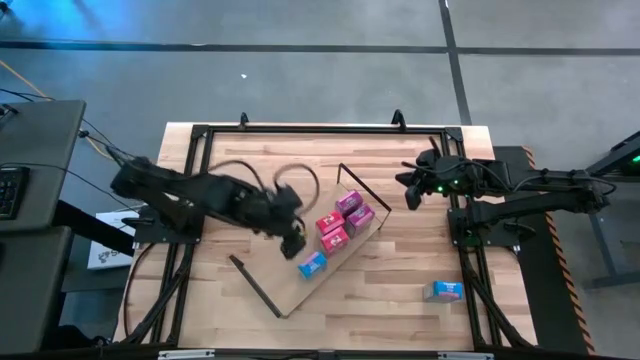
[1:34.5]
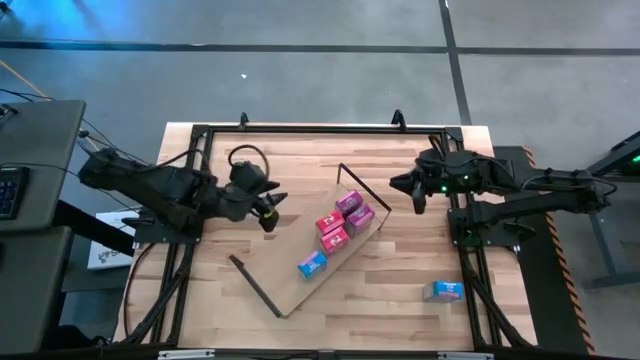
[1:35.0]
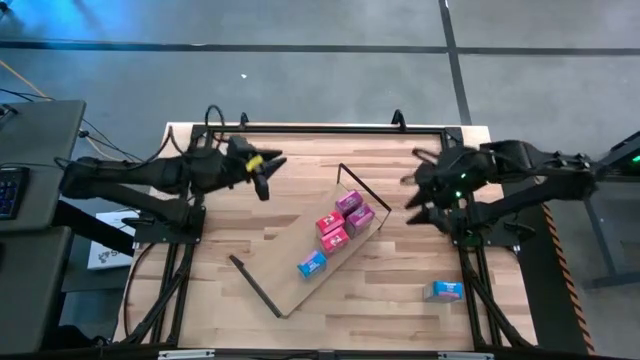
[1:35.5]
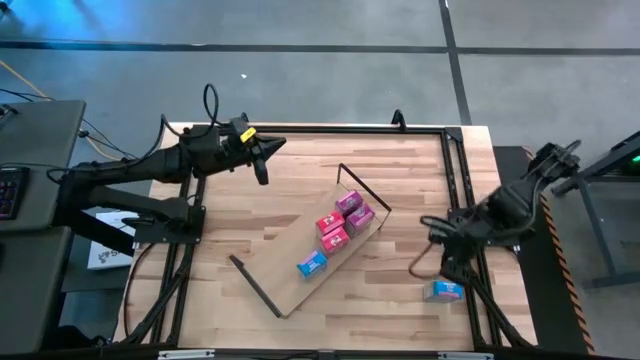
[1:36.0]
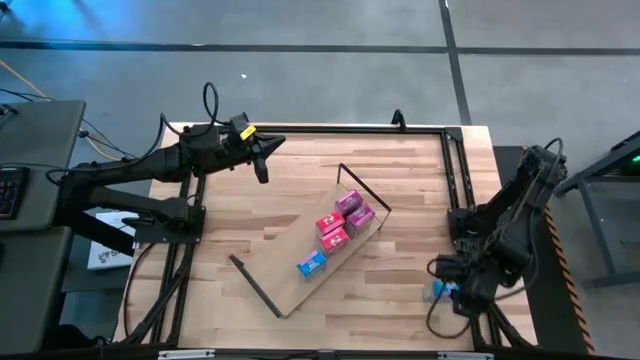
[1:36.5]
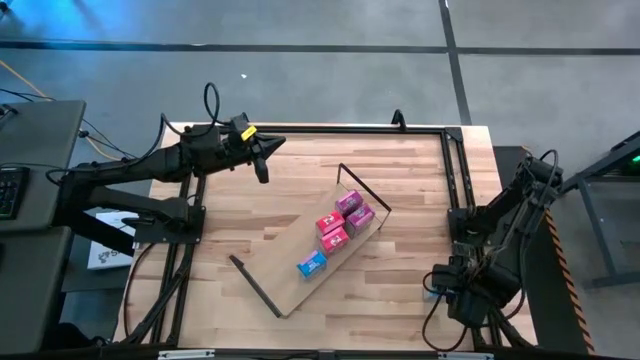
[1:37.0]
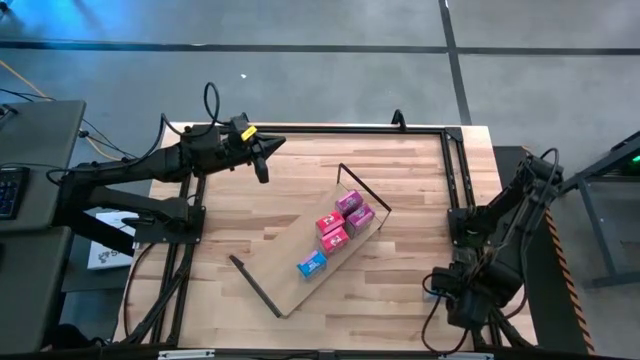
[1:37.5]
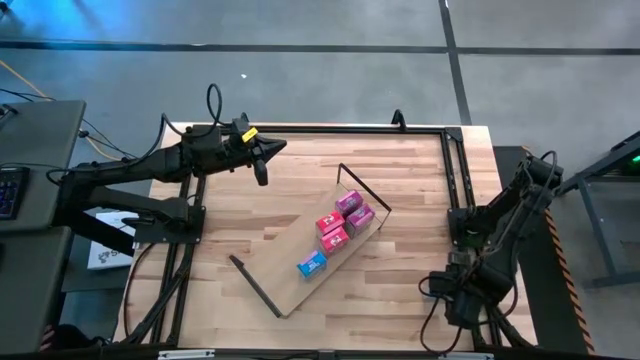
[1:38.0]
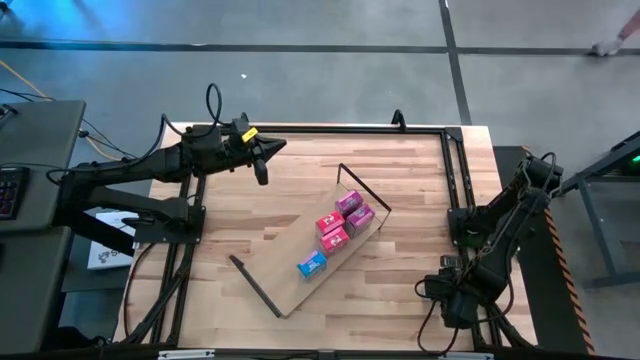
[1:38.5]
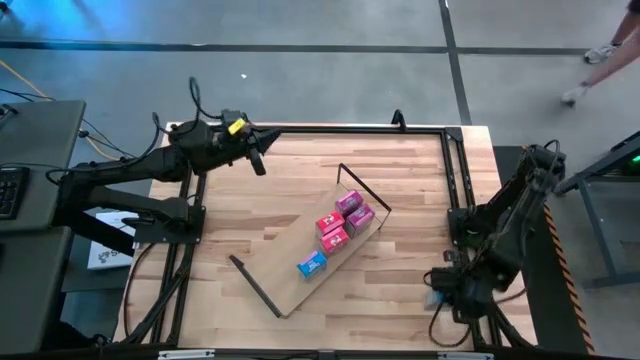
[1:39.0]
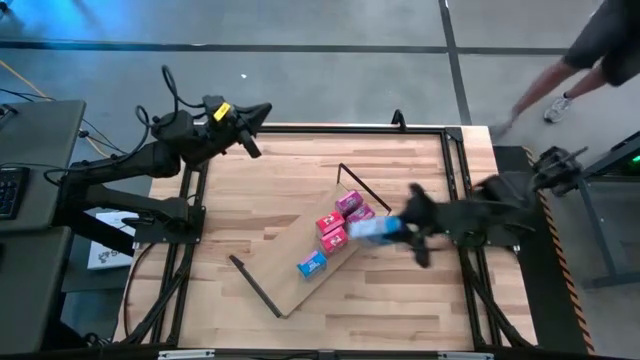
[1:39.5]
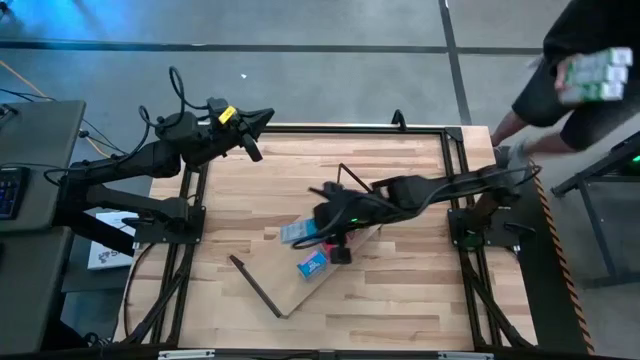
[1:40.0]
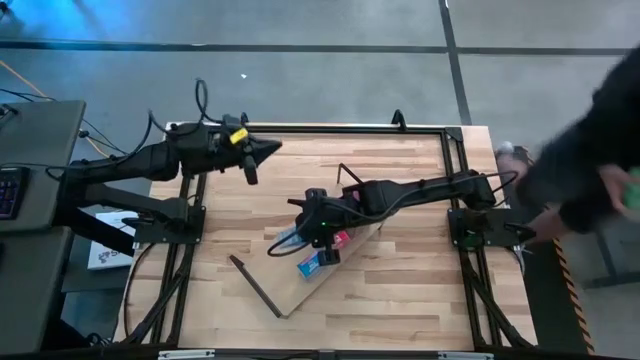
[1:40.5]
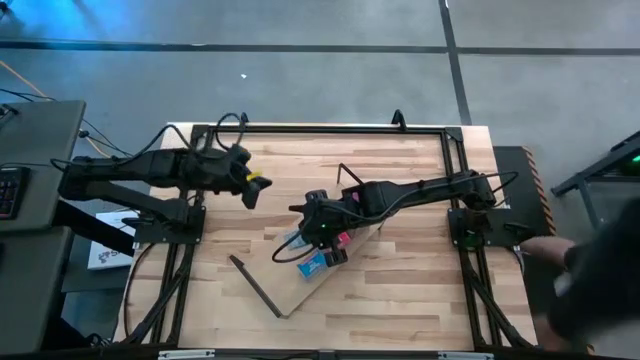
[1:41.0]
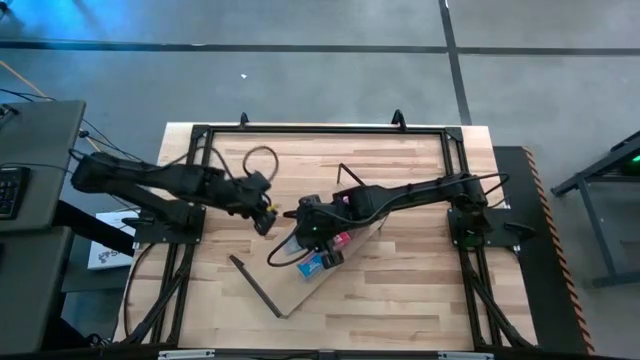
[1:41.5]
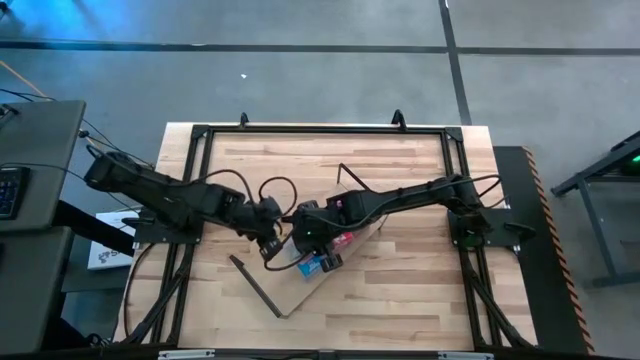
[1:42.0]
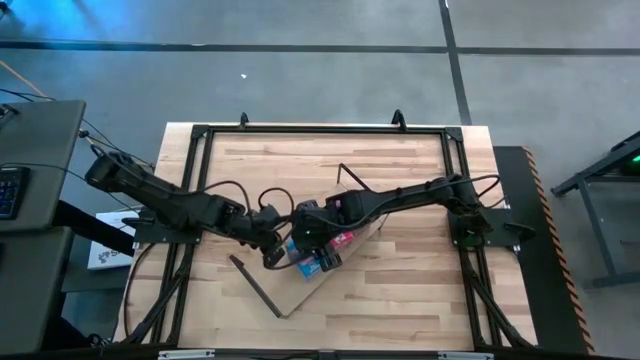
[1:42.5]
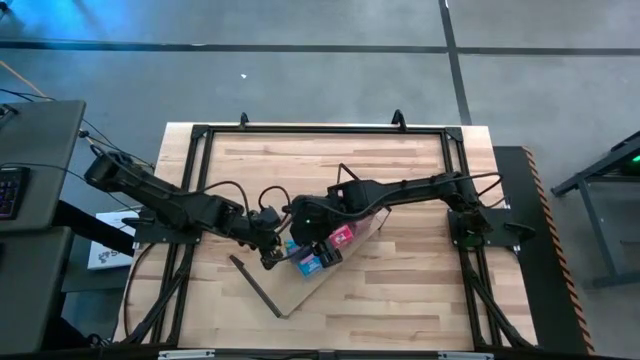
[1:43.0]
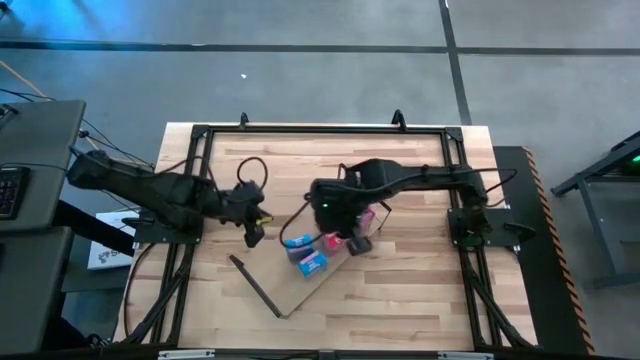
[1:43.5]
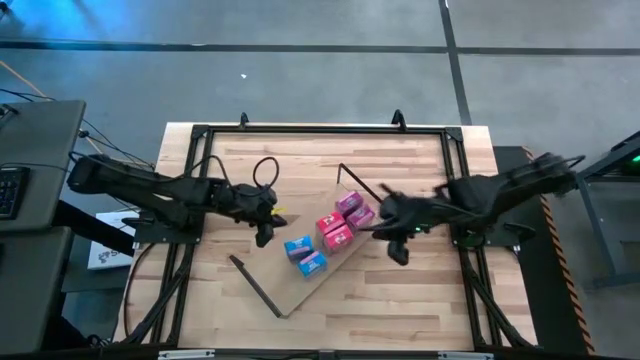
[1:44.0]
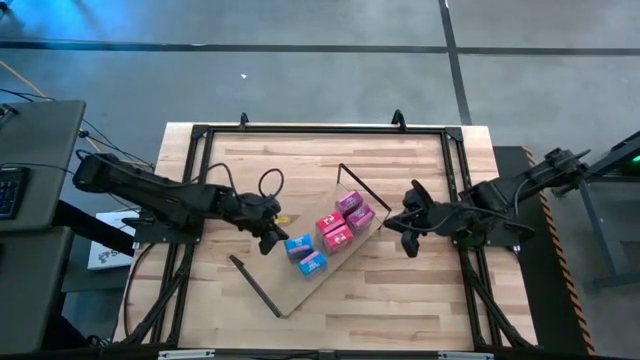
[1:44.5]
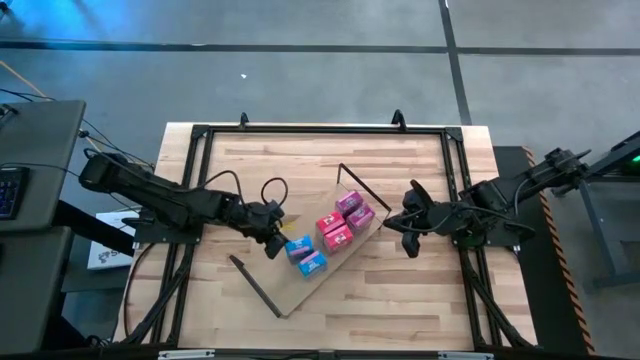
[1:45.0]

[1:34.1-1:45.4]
Task: Stack cereal on shelf
Put the blue cereal box on the shelf aligned with the other blue cereal box

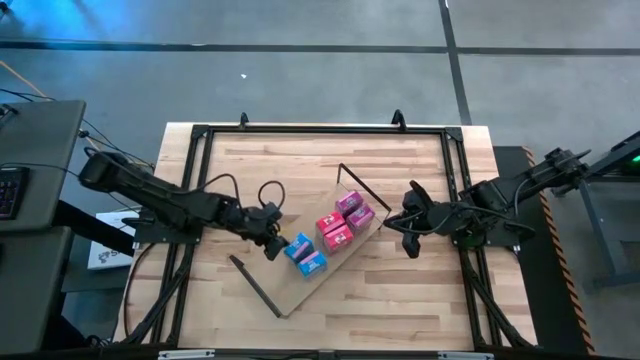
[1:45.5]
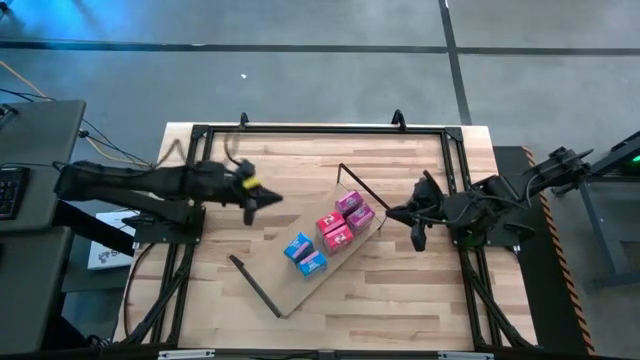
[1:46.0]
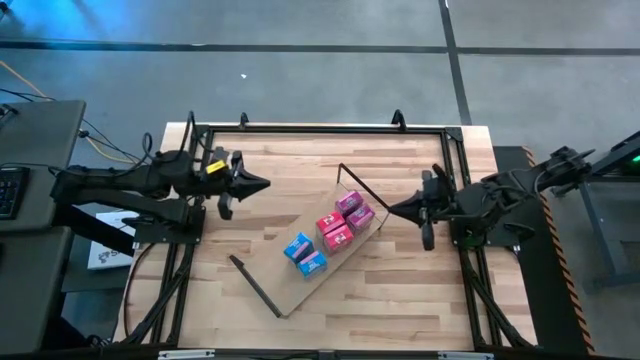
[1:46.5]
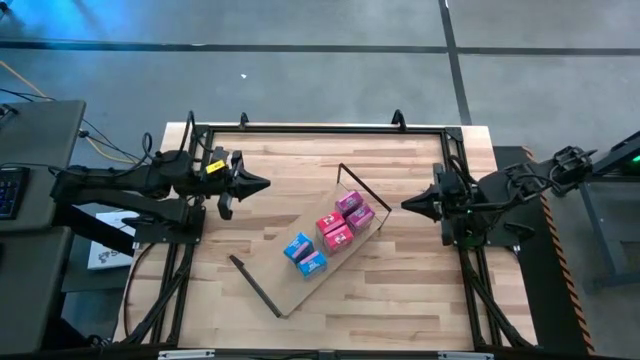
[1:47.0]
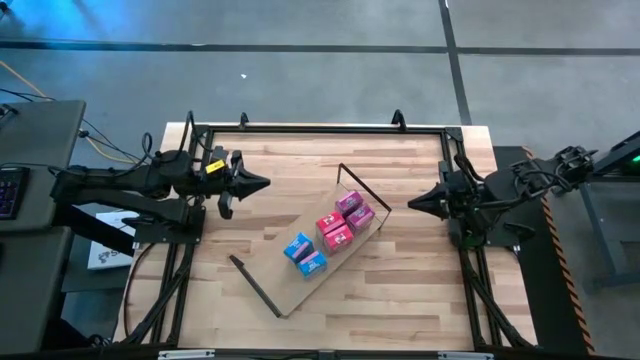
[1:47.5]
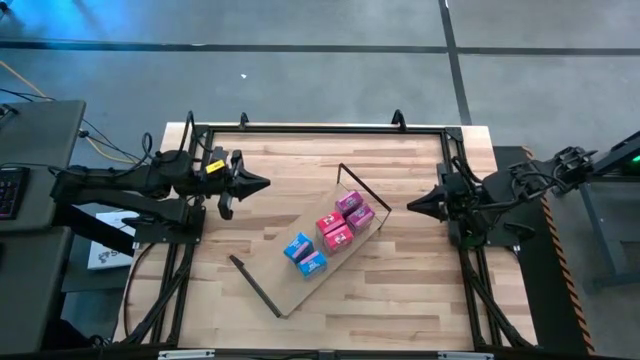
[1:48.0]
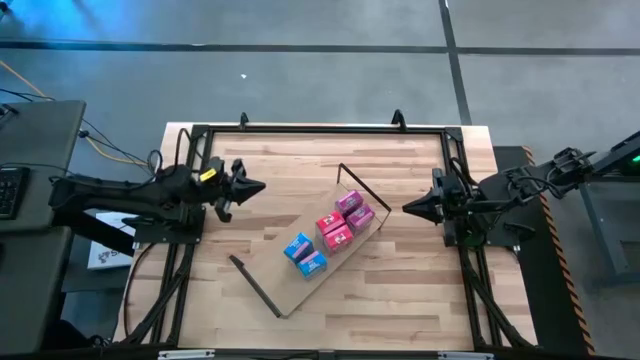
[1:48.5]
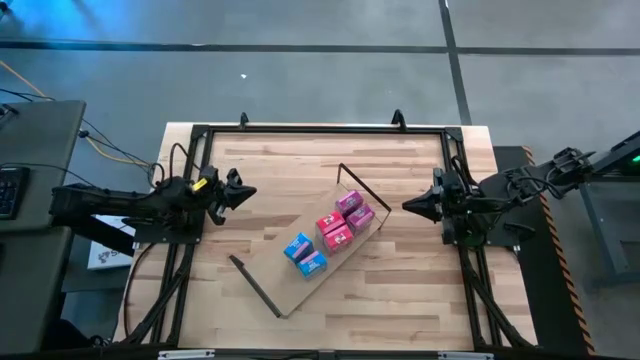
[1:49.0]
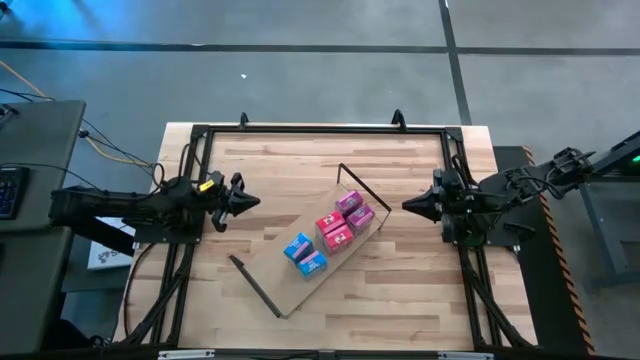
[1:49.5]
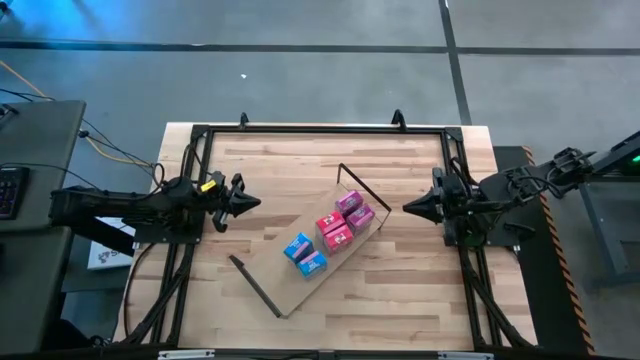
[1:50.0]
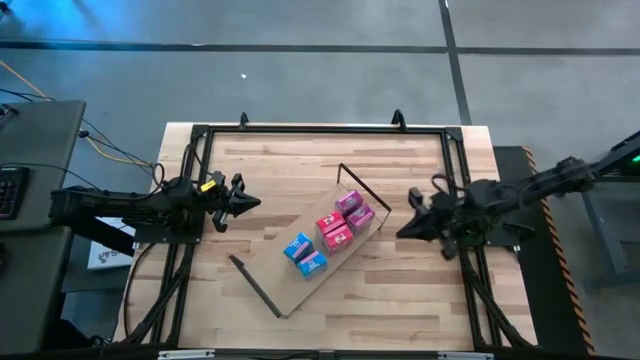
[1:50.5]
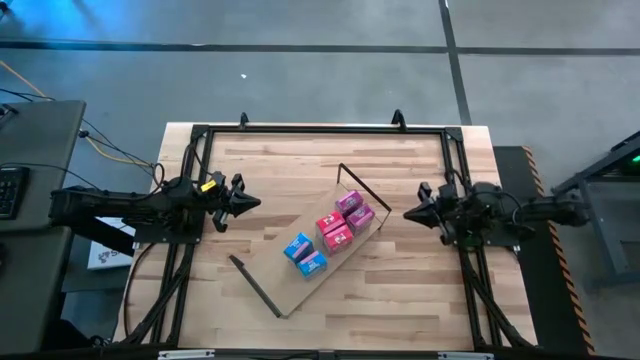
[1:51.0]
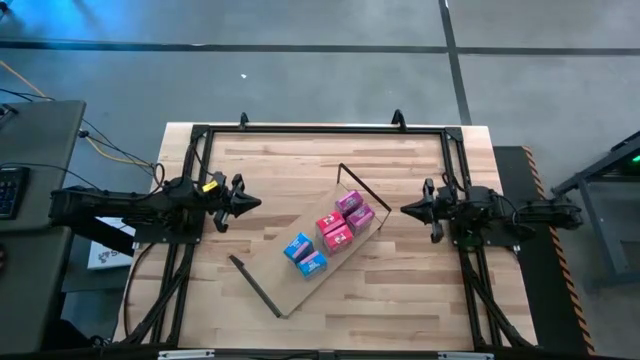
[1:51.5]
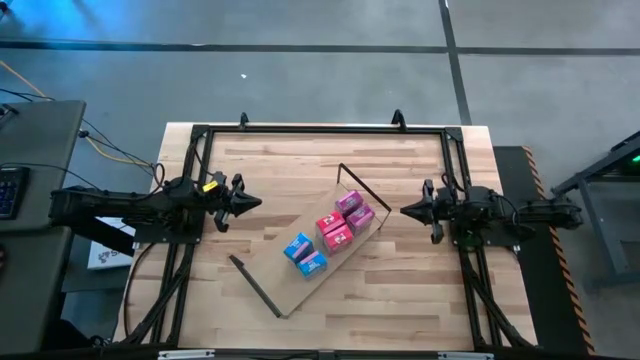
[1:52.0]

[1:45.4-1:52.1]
Return to Home Position

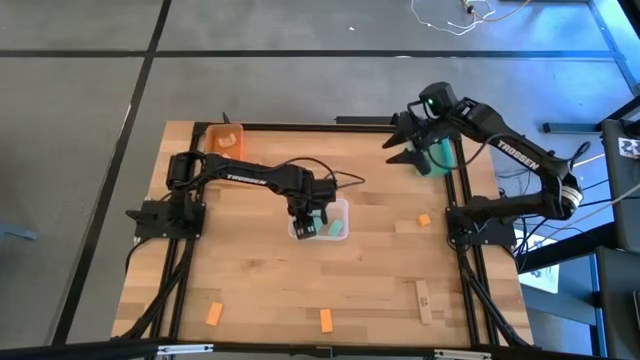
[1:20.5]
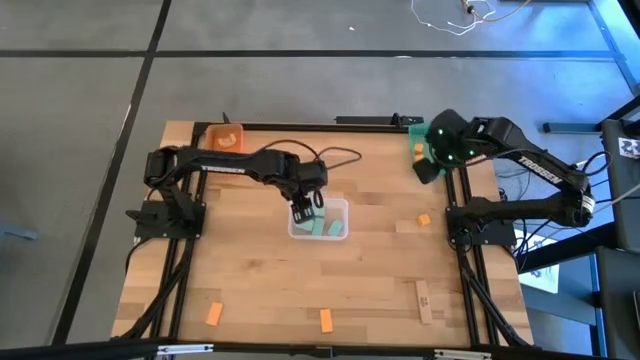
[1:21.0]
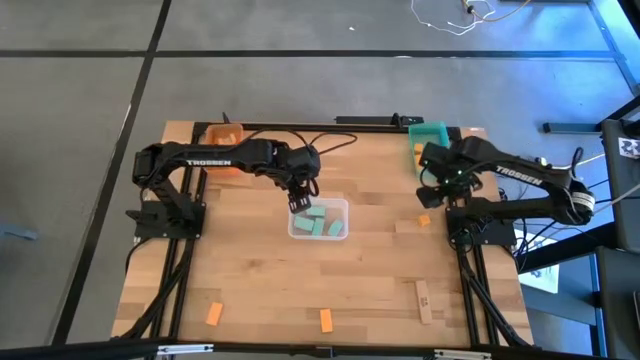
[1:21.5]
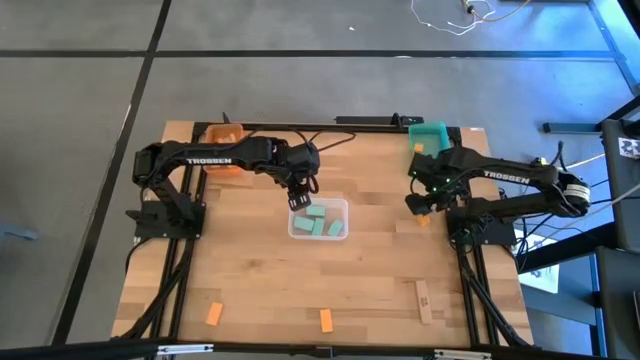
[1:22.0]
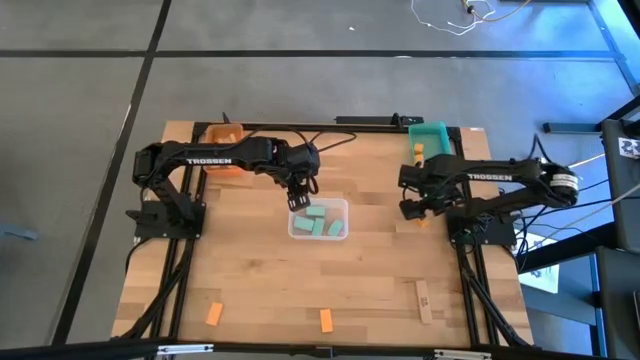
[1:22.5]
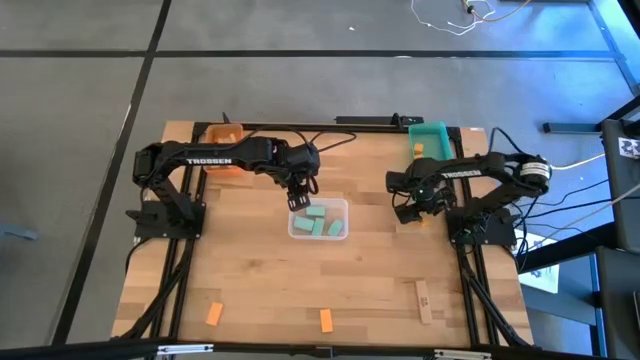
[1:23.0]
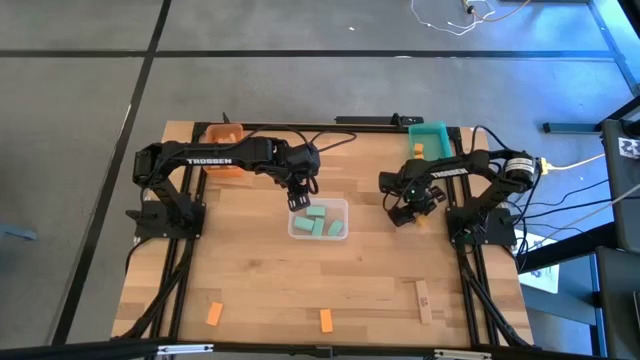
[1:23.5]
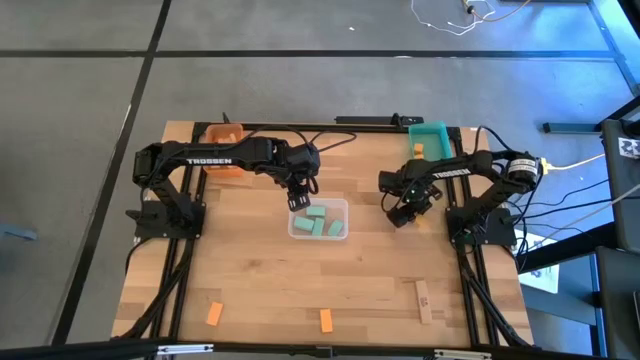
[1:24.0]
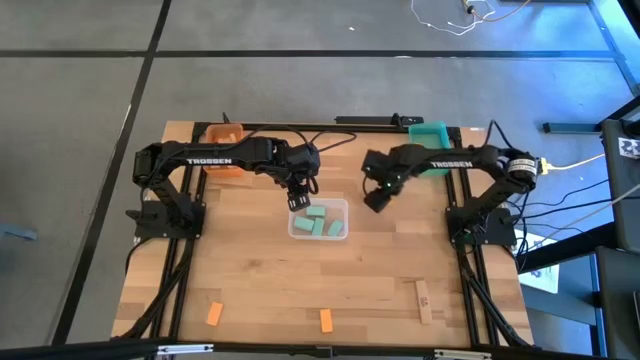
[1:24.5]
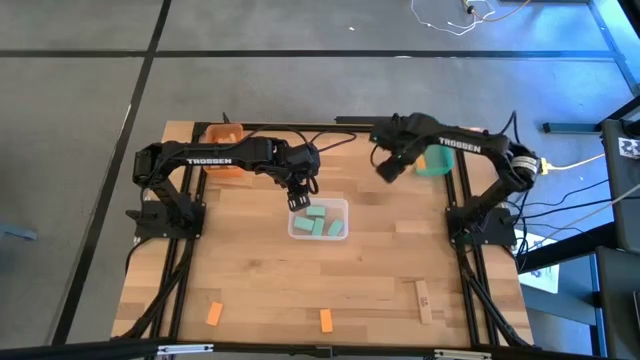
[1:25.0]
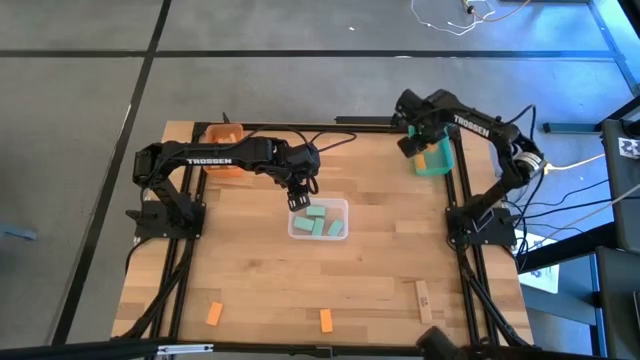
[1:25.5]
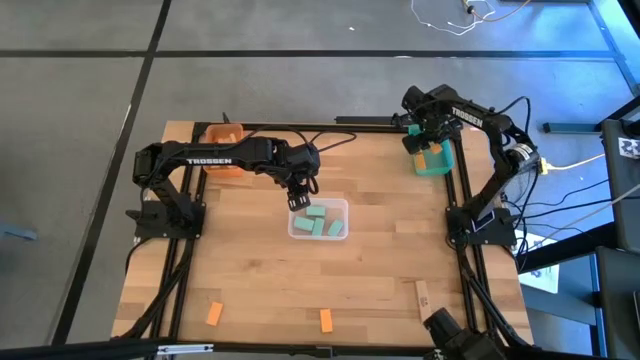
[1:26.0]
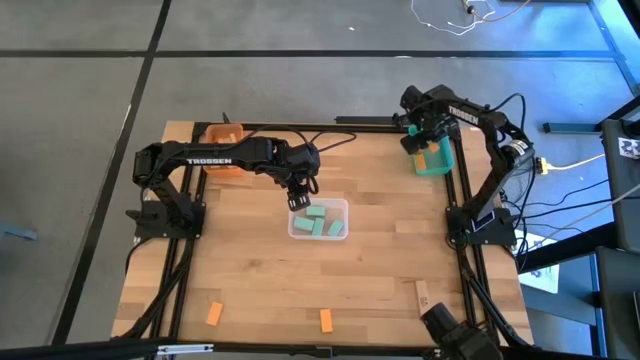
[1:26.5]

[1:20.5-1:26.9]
Task: Sort & place blocks by color
Put the yellow block into the blue bin
